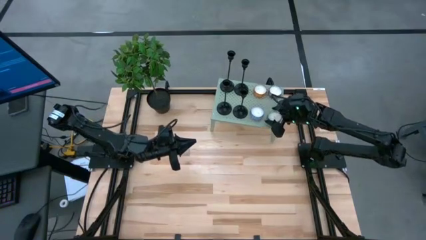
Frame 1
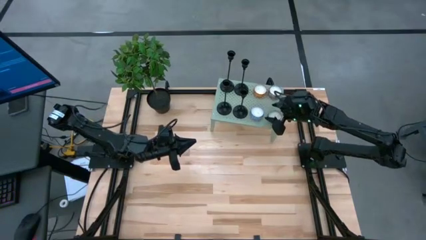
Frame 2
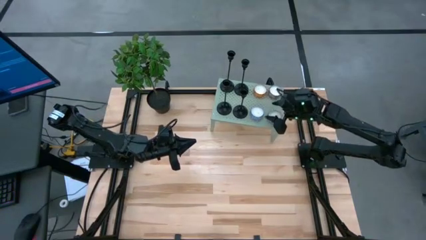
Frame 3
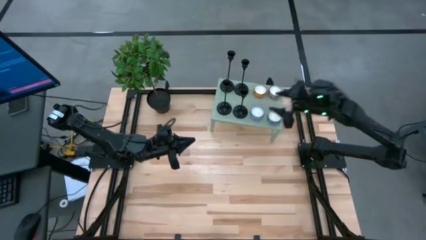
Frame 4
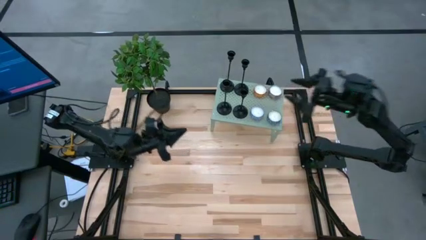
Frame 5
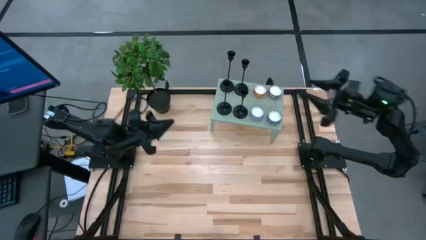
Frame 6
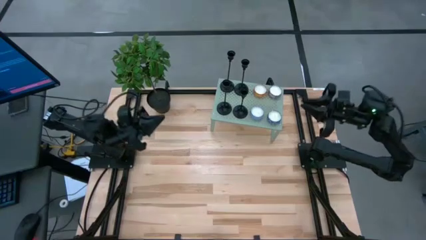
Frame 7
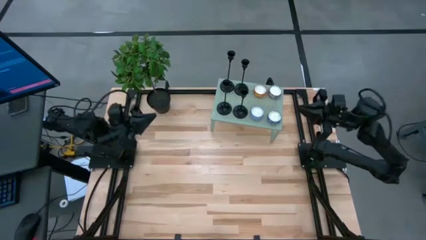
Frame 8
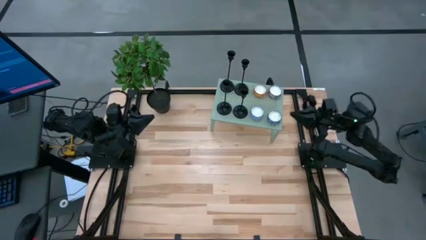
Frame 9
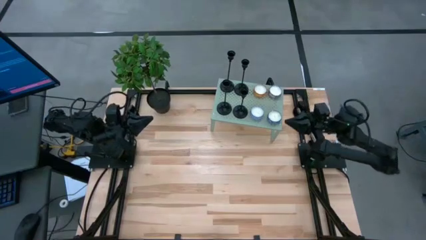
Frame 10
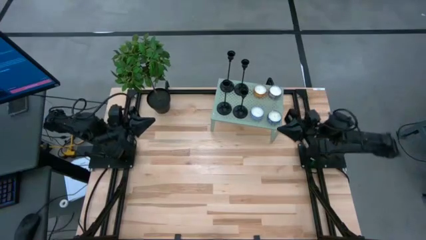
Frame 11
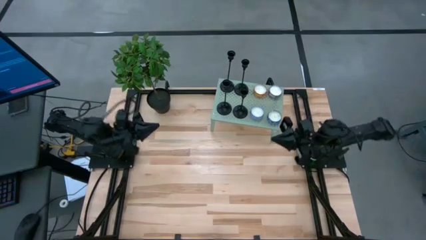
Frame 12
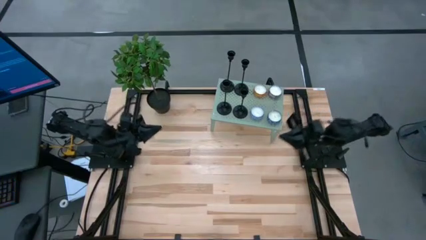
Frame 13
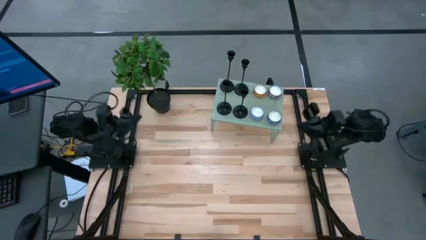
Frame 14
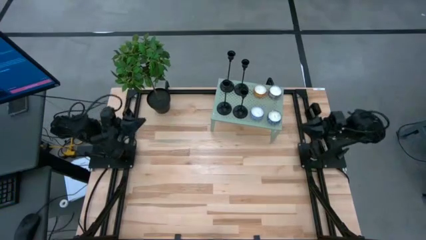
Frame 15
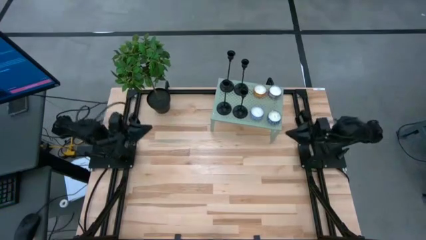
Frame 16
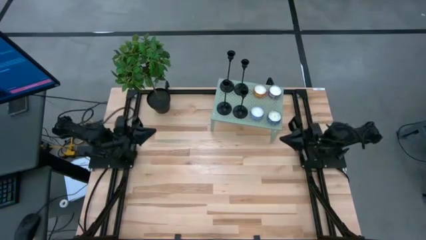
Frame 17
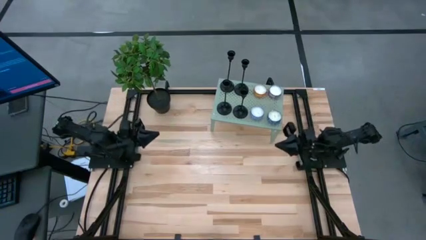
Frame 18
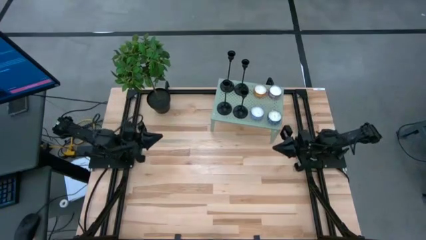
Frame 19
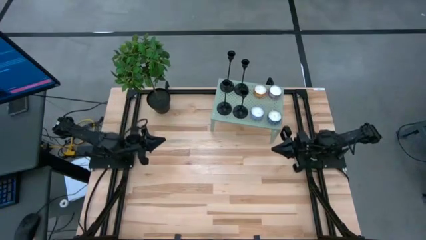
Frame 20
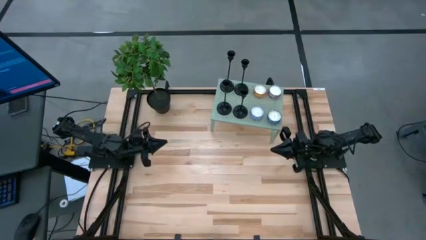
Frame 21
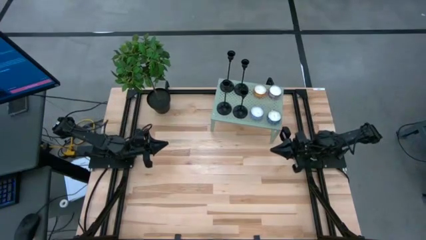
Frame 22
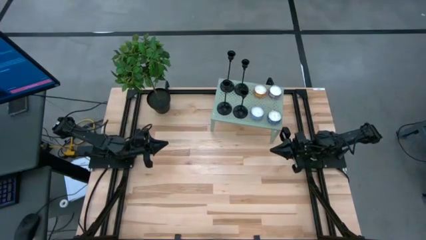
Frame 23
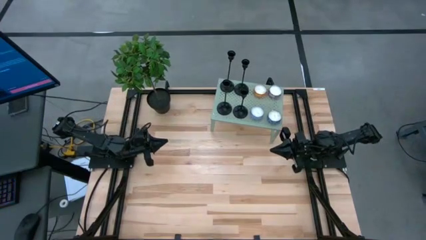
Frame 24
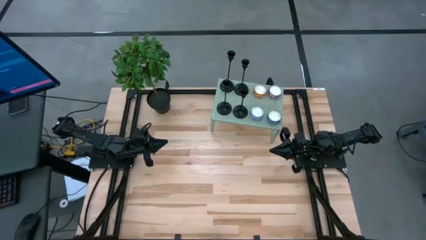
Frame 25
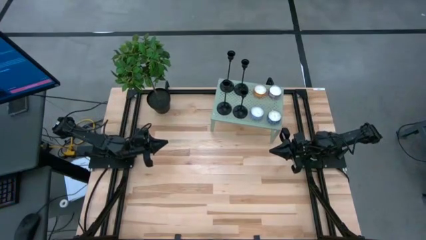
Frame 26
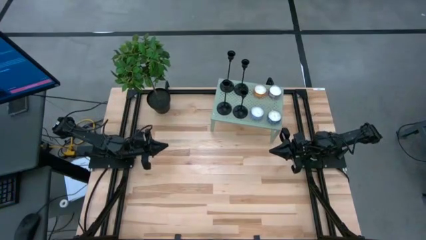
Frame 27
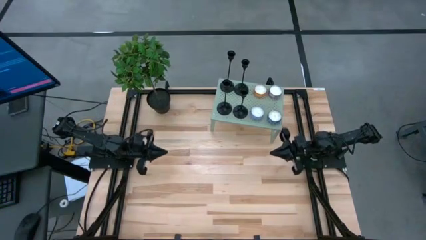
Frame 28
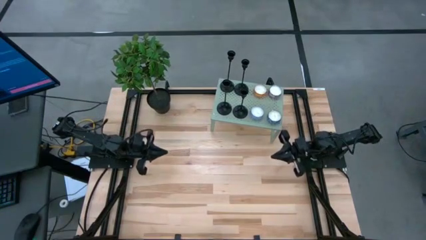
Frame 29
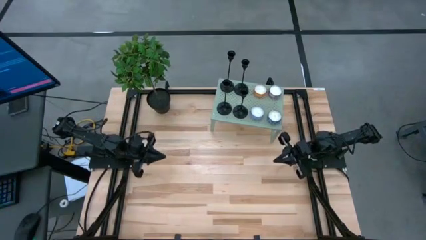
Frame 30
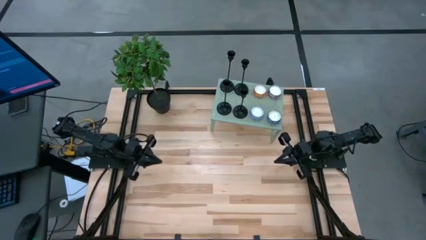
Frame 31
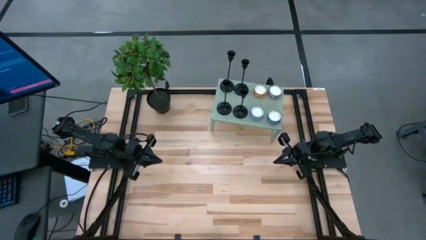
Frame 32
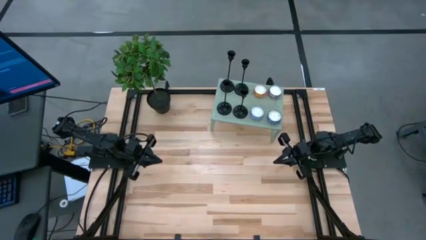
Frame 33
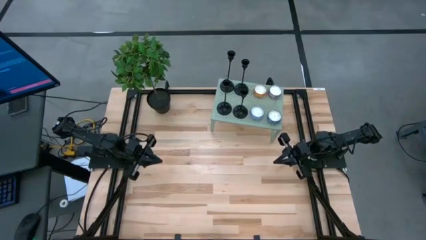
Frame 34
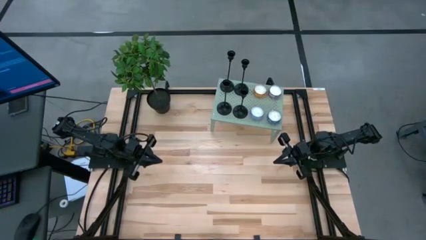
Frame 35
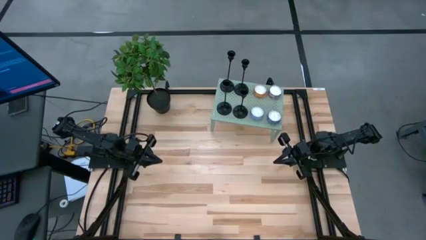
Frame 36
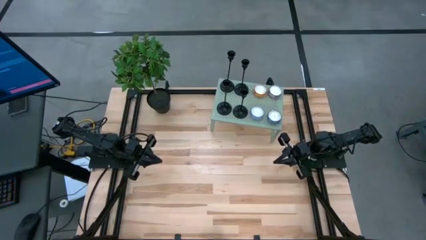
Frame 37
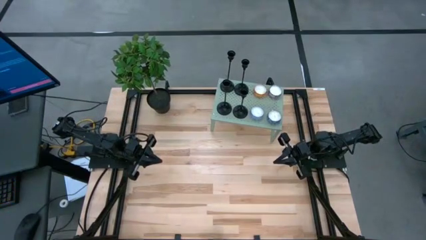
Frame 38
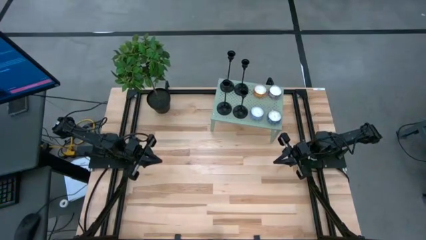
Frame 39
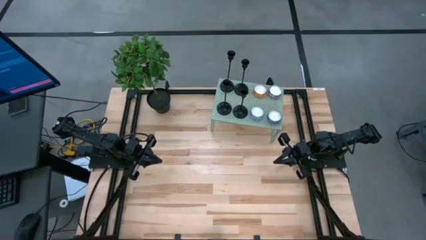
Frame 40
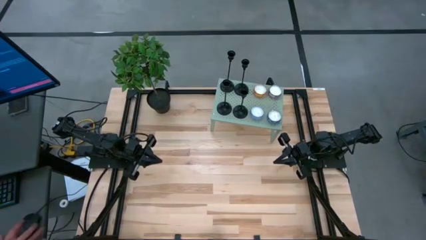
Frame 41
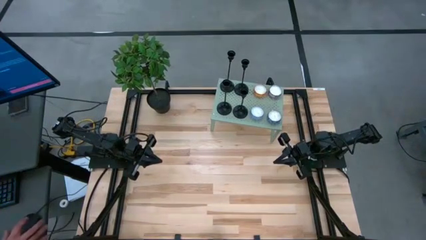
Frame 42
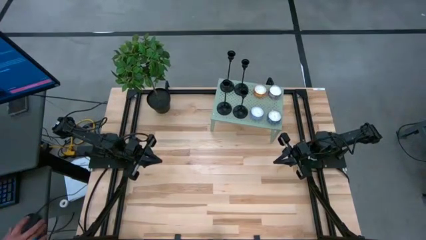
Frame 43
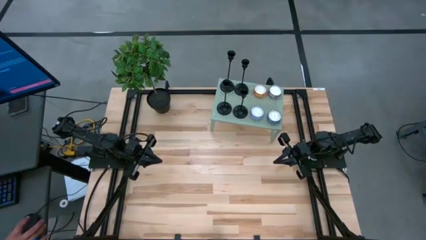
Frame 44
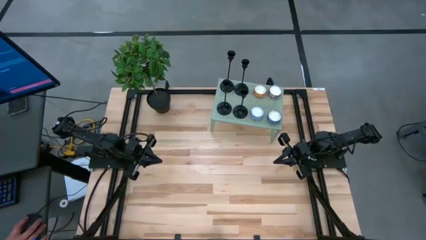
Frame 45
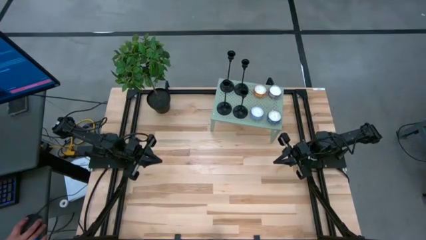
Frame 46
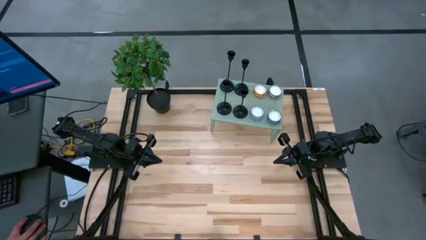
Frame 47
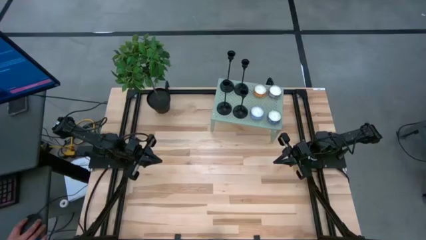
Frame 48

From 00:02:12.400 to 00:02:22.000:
Task: Pick & Place candle stick holders
Return to Home Position

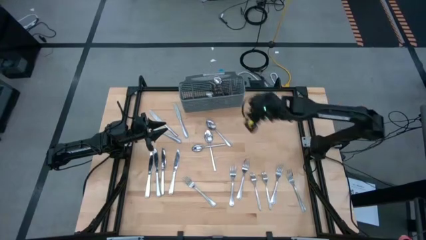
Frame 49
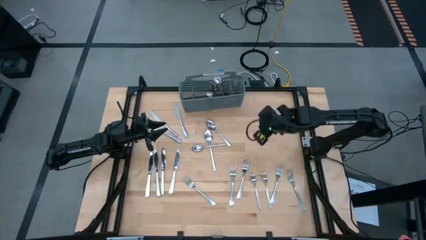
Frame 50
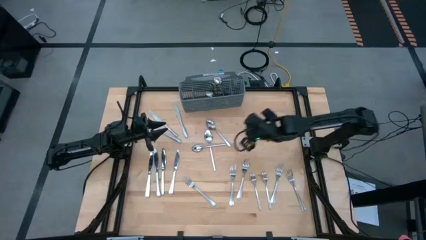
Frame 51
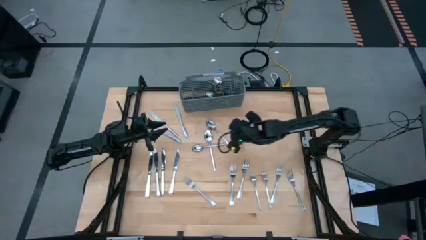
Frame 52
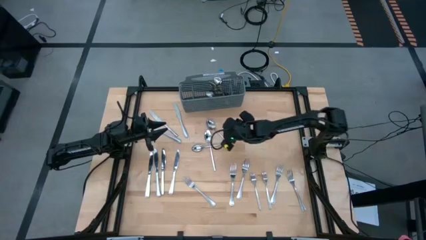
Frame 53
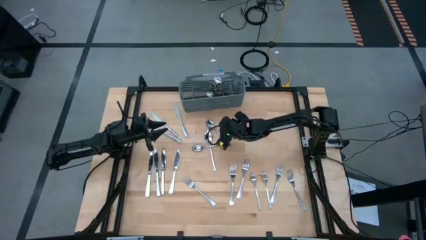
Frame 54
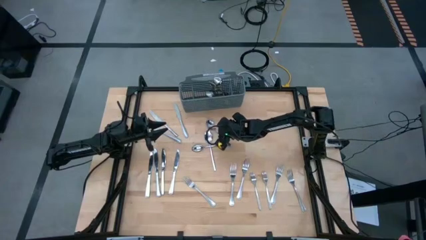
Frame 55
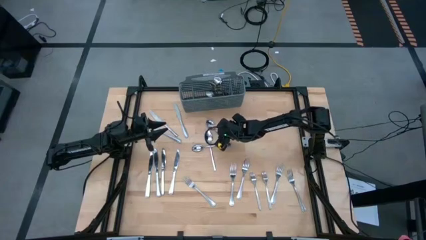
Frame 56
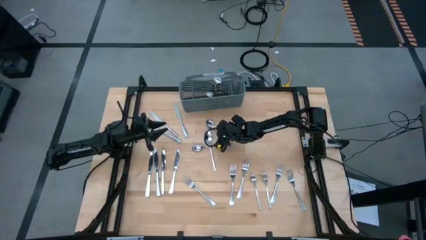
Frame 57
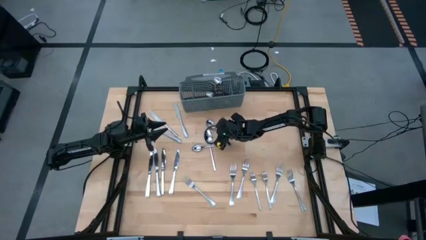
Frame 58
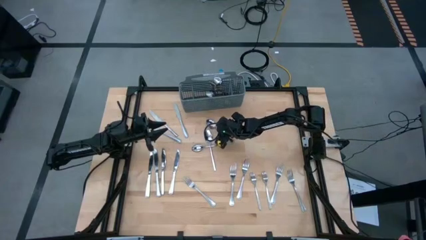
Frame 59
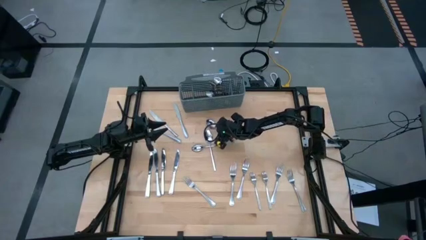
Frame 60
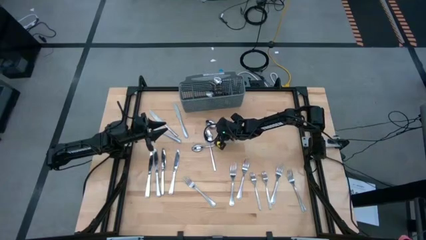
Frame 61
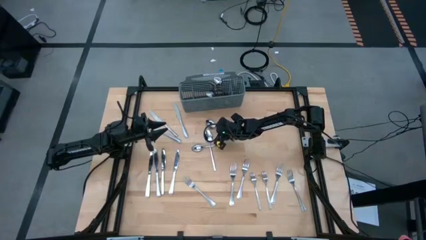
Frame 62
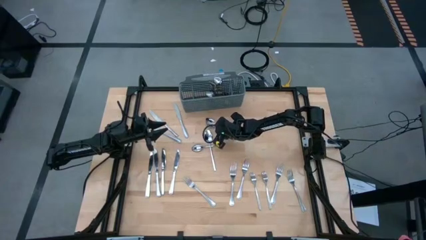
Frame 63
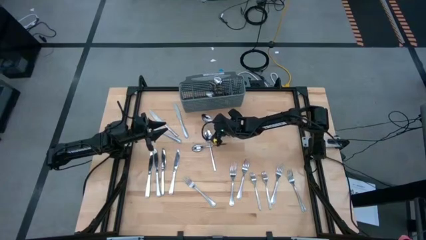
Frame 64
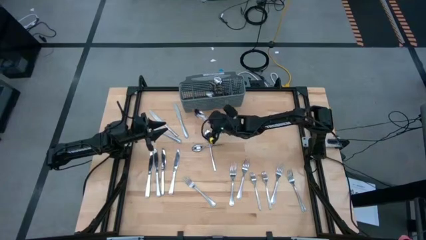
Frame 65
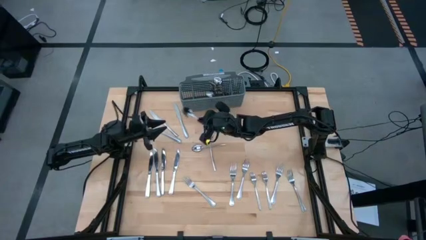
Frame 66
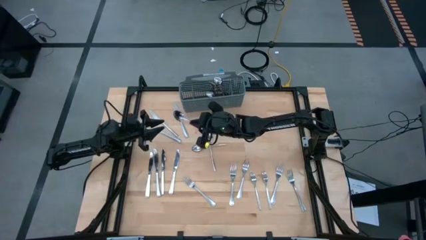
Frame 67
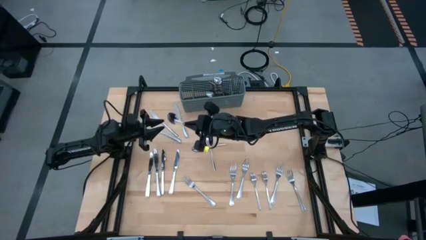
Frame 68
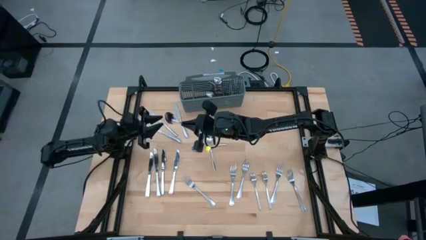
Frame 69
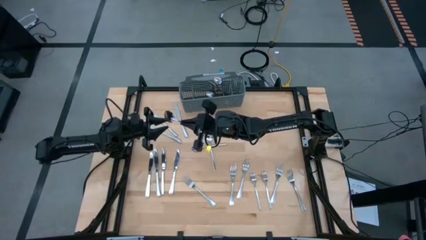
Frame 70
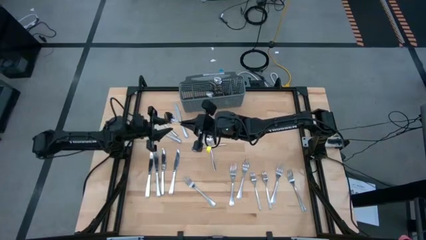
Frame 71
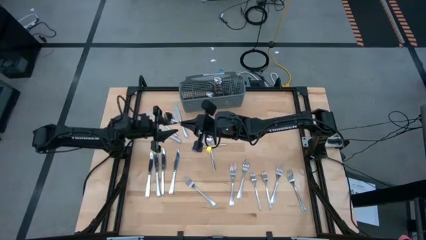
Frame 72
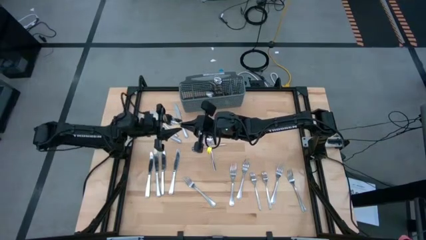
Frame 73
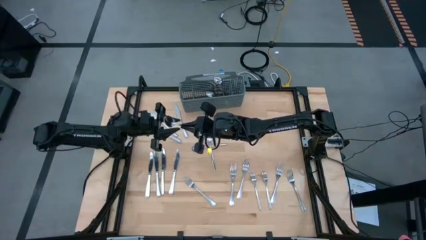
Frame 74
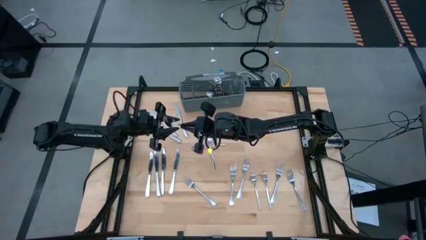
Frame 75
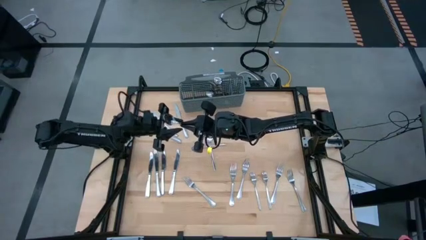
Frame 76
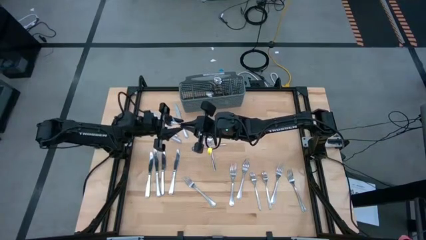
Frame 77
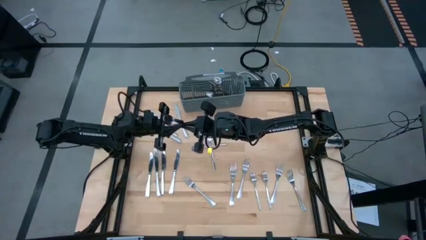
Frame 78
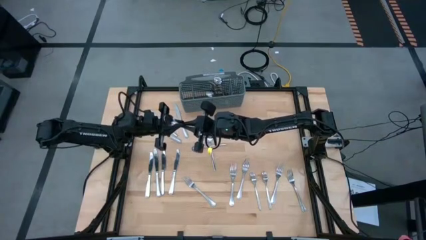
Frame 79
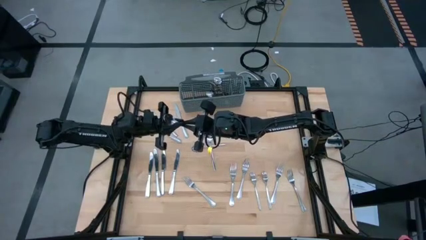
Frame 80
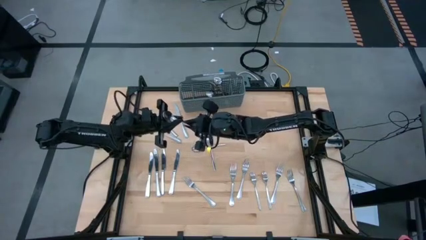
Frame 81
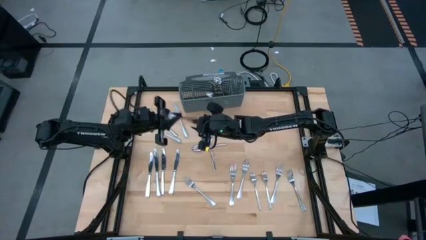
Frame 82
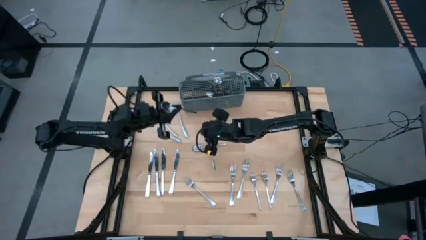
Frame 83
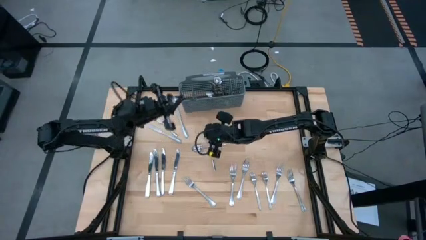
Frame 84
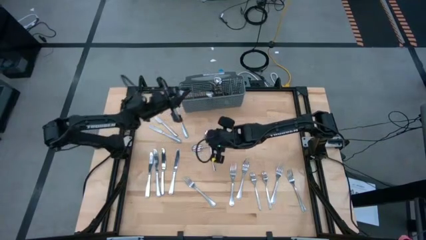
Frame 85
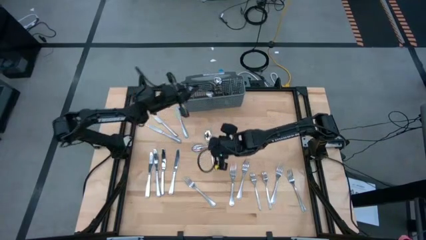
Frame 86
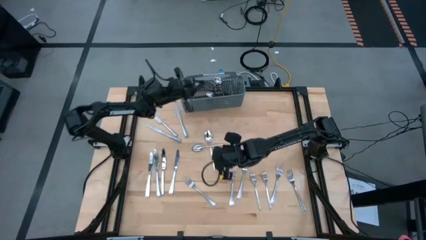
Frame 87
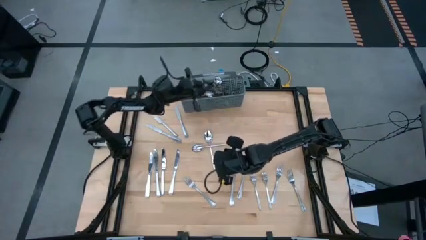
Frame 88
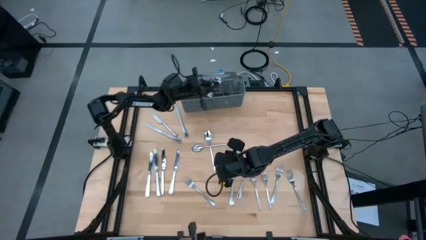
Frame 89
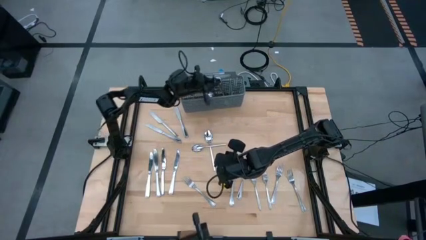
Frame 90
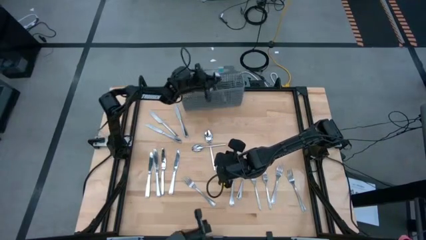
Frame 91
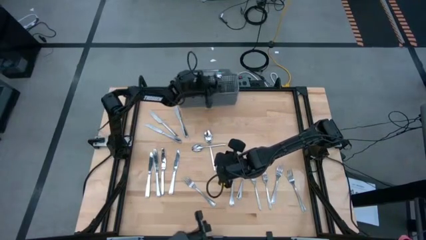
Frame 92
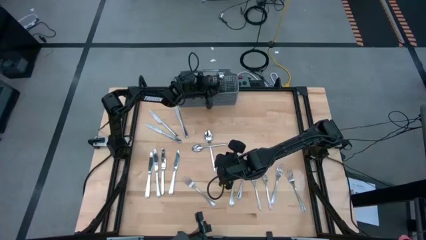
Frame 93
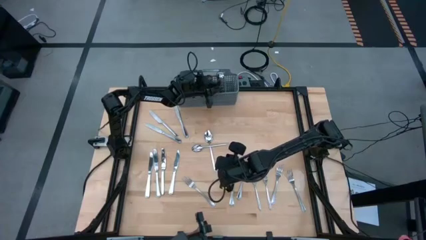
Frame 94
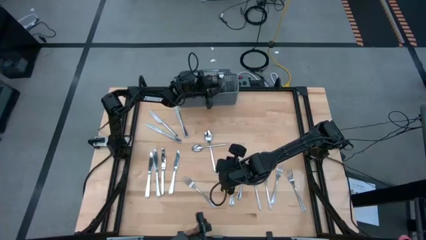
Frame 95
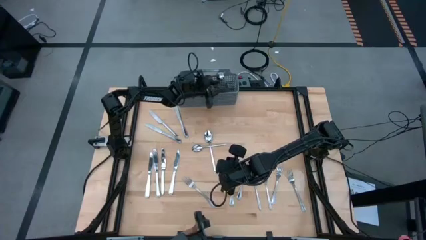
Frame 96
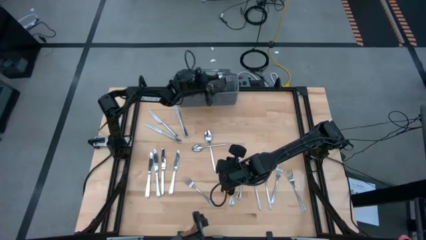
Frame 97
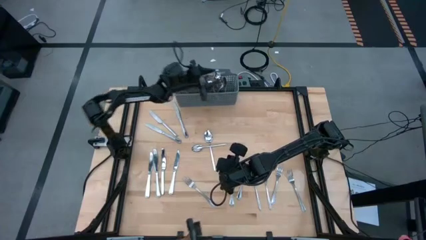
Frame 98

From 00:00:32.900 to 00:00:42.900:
Task: Sort silverware
Put the silver spoon into the gray utensil holder
